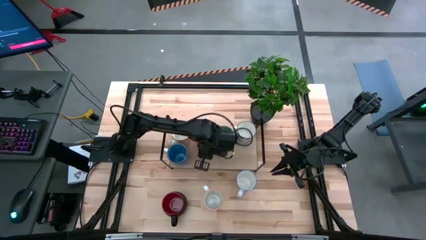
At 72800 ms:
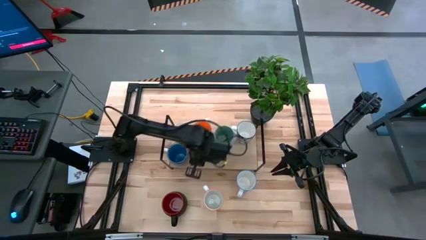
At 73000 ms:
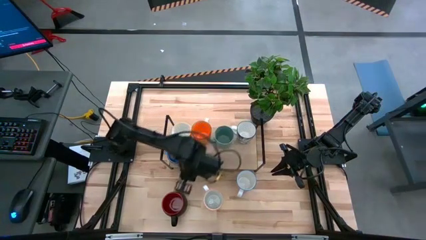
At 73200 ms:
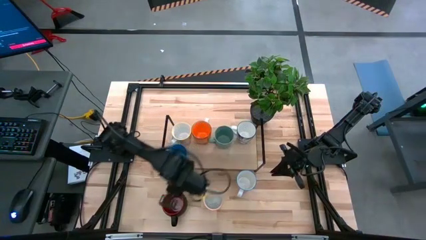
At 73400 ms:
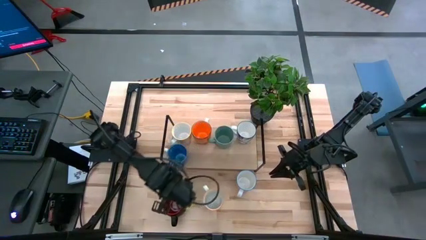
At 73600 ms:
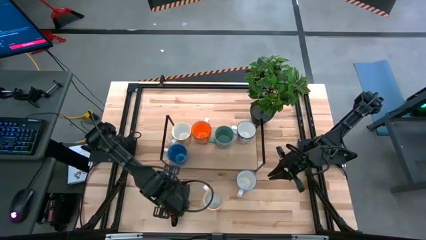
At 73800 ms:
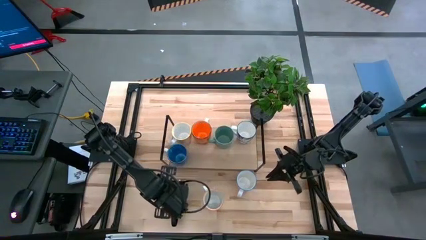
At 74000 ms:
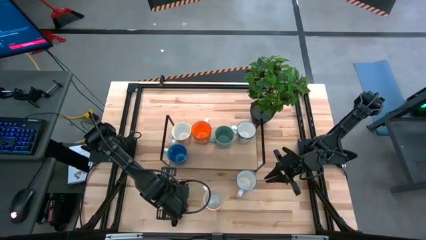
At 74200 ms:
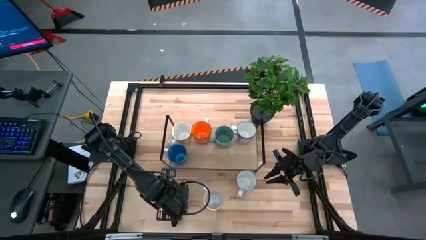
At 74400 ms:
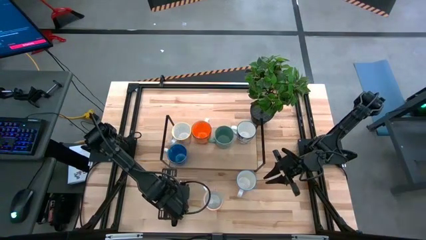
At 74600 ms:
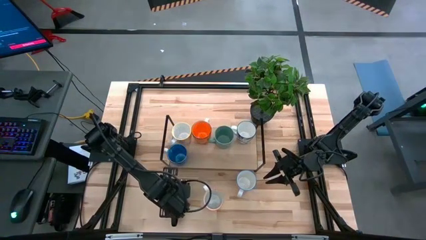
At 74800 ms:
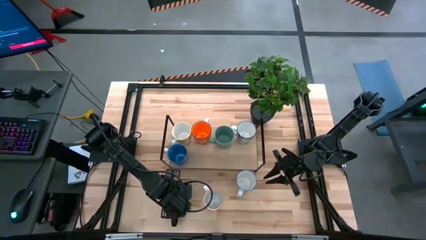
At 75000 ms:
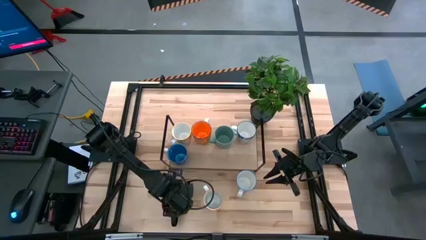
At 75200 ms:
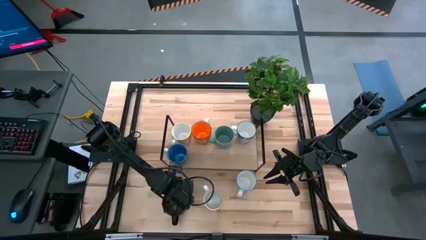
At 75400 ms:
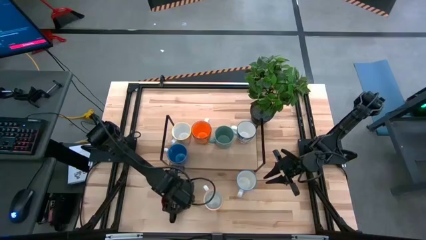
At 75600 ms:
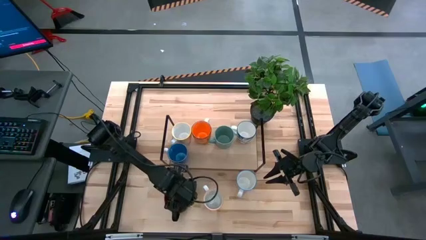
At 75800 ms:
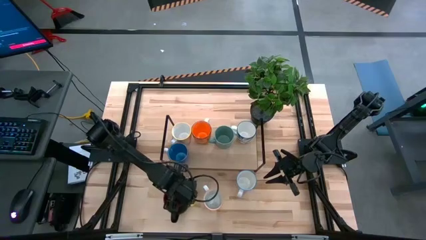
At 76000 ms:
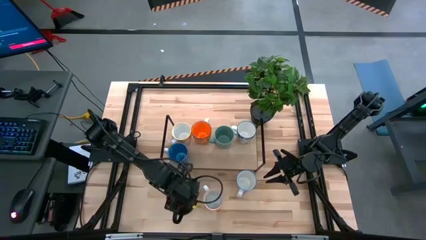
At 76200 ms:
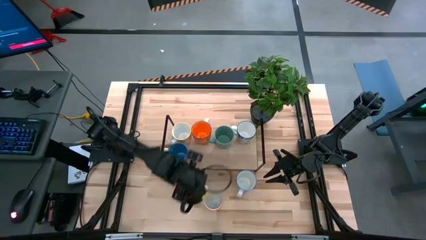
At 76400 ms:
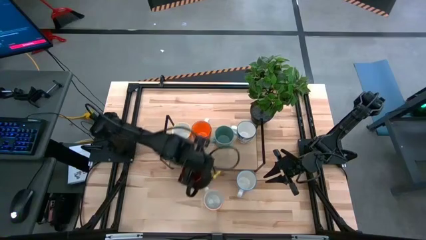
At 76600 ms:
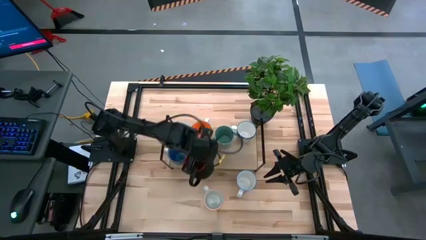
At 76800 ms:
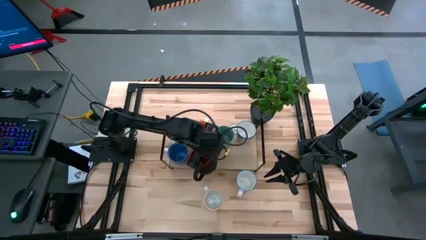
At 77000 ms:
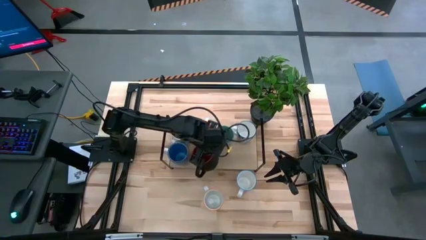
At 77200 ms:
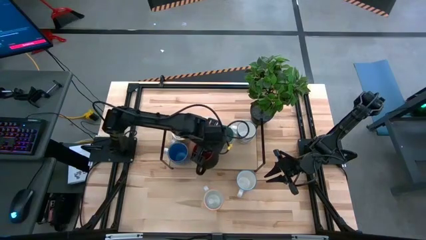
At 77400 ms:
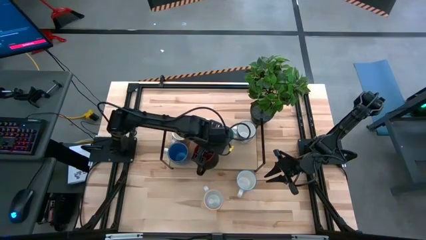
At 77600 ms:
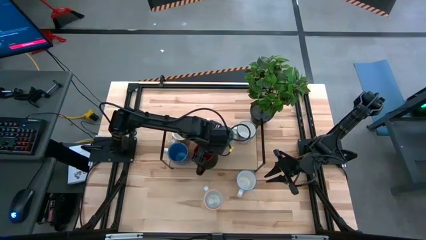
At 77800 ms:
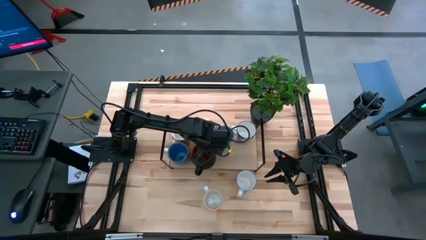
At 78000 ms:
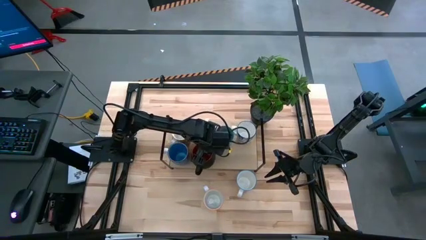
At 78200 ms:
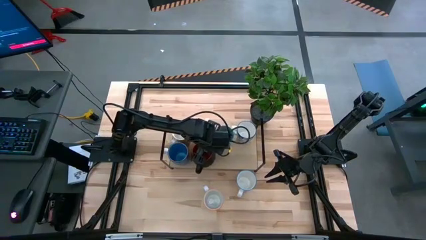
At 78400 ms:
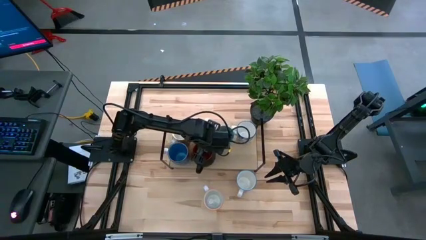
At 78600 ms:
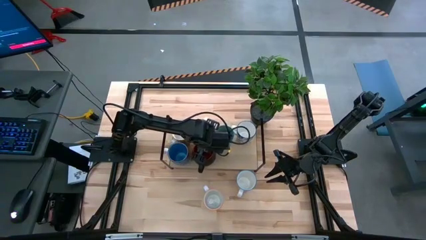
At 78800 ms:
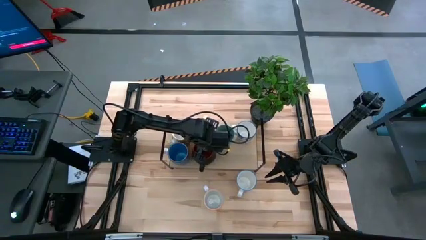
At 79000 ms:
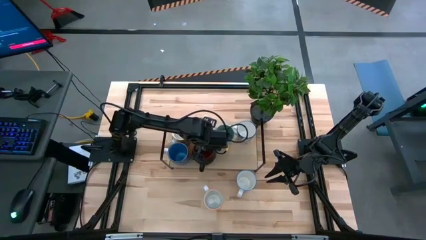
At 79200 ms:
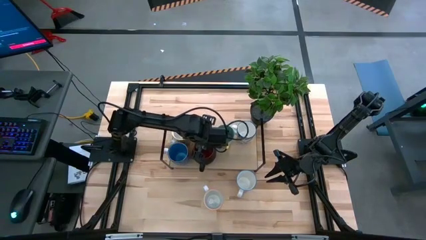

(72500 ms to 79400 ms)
Task: Place coffee mugs
Put the black and orange mug on the shelf

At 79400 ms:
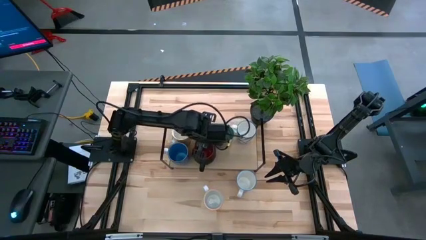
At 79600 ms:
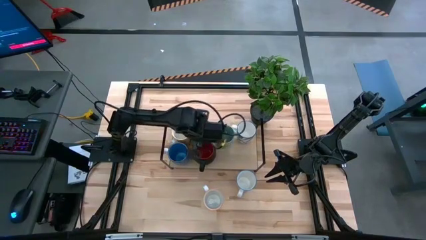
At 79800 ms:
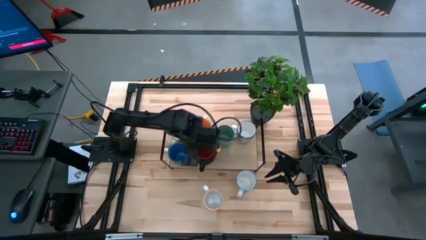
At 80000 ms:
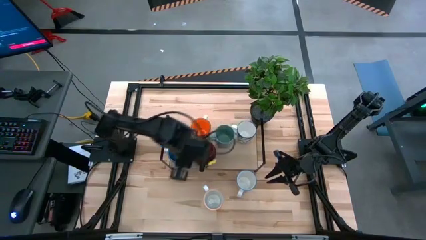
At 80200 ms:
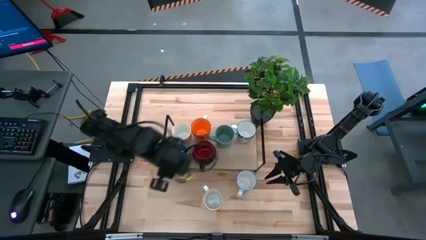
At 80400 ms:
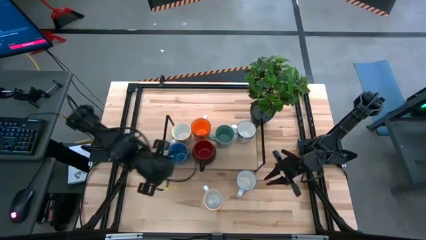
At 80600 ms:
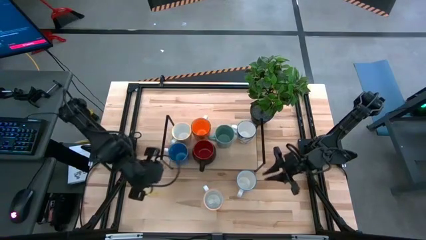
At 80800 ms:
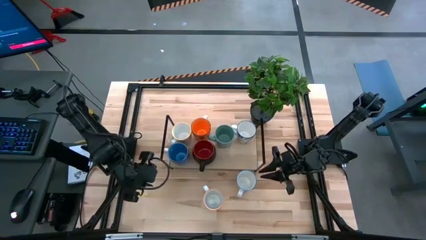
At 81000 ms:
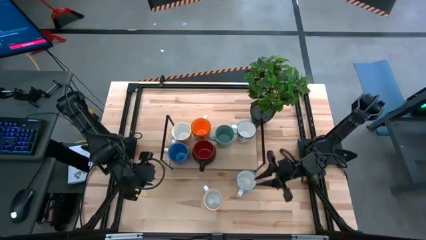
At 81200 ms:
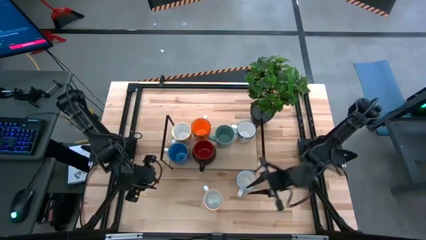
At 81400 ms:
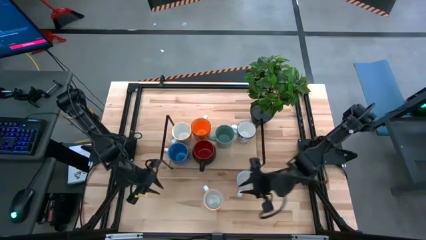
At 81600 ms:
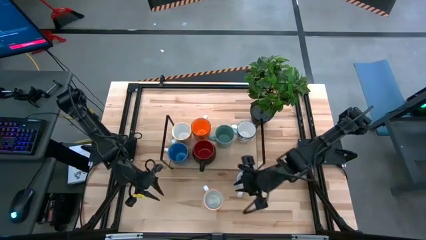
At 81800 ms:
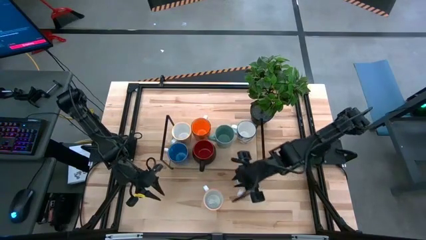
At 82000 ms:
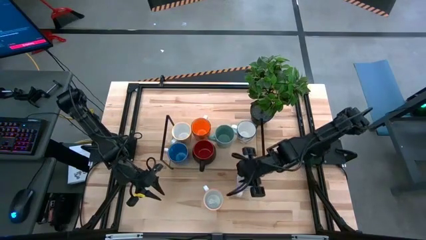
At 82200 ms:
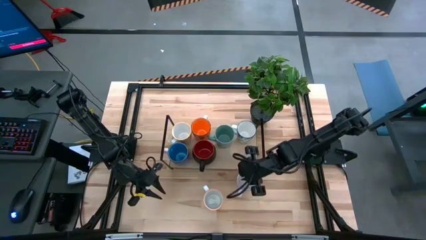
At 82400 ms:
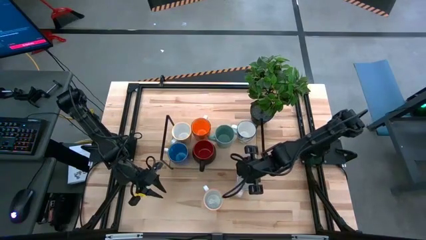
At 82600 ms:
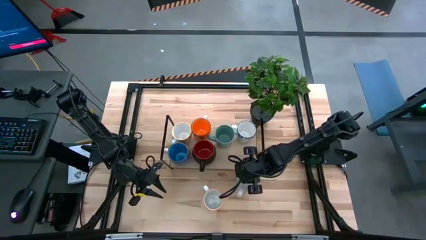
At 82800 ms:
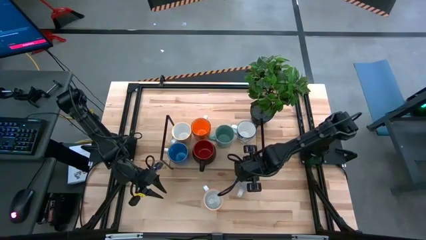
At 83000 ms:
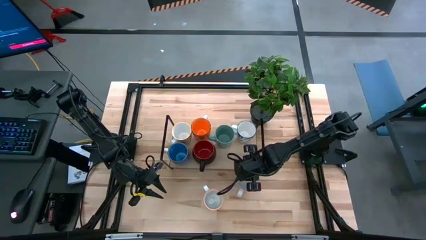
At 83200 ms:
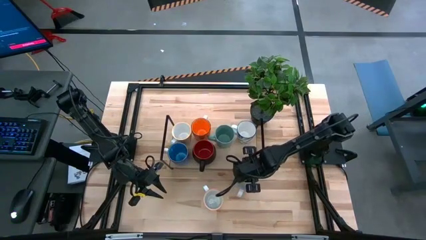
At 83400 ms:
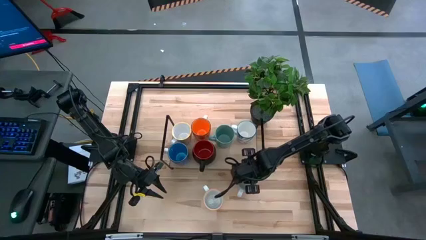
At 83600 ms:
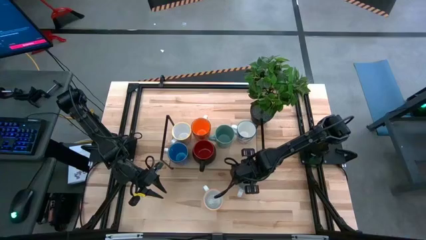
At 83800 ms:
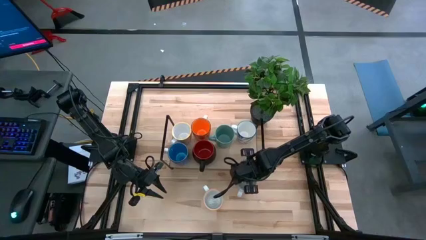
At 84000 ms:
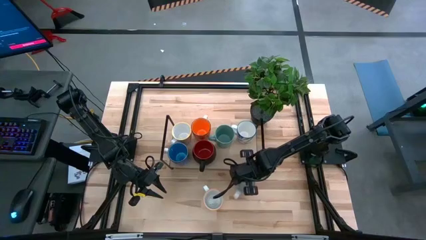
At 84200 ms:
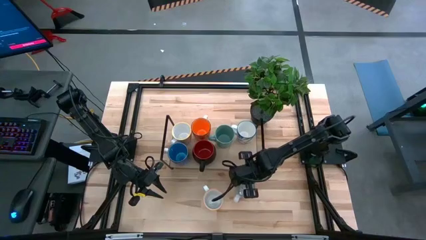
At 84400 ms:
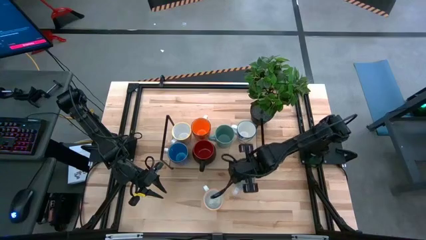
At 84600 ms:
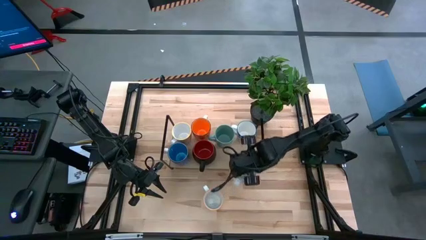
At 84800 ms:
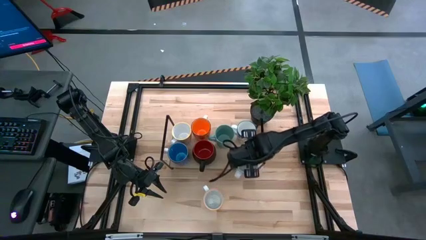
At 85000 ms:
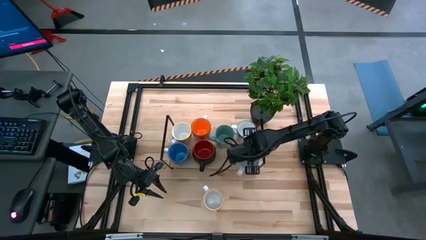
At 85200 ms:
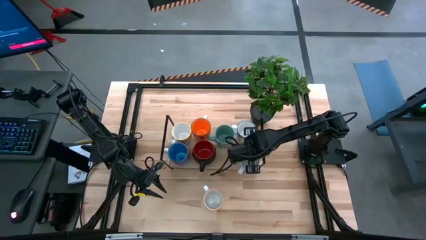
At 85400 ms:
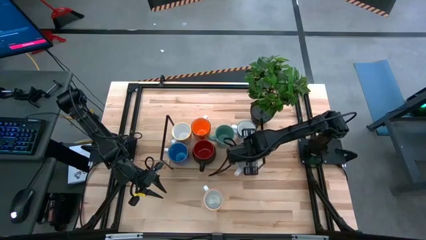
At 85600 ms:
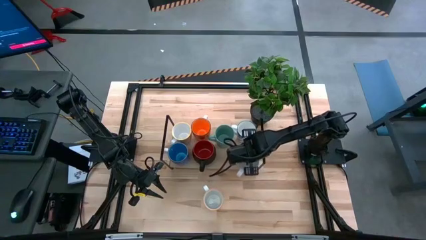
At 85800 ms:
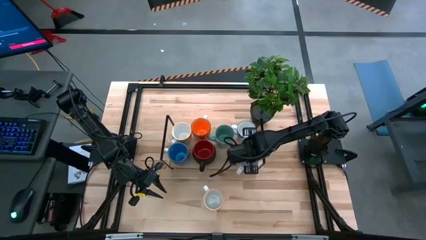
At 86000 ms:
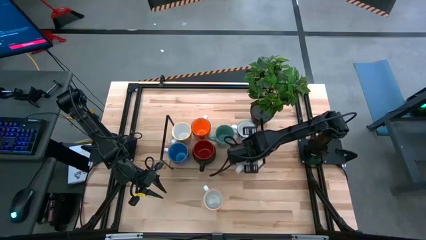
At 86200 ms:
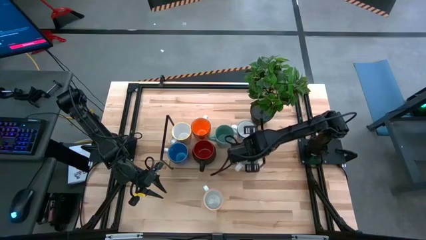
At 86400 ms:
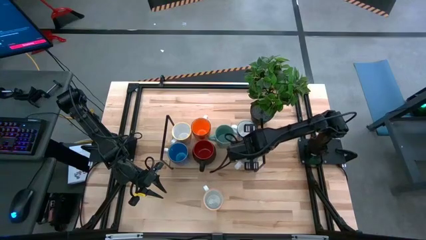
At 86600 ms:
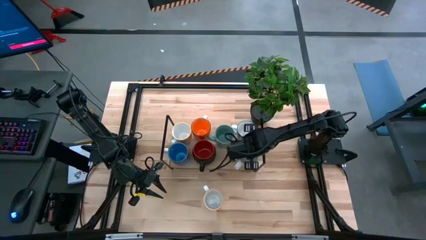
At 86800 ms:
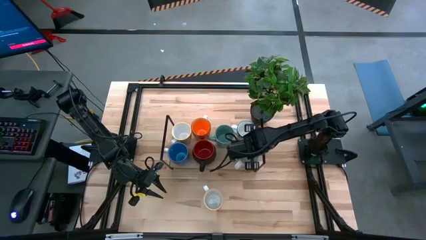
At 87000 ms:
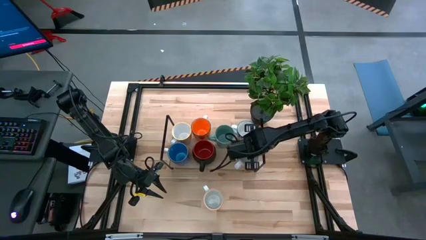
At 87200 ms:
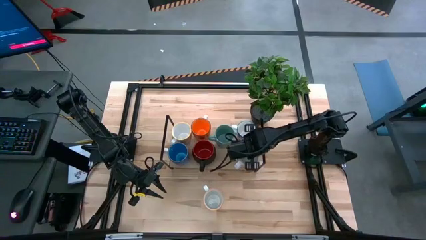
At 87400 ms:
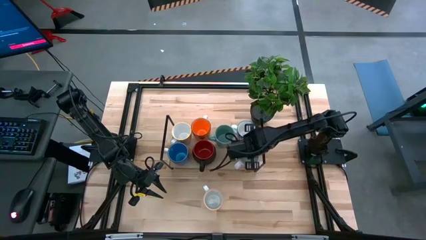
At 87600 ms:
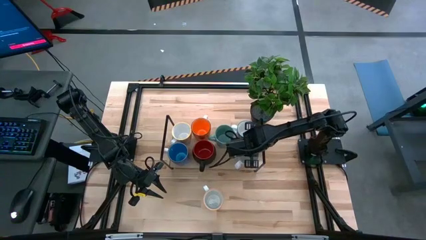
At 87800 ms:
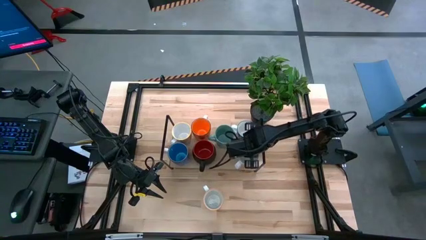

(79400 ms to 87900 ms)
Put the red and white patterned mug on the shelf
